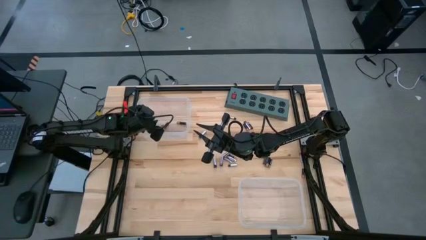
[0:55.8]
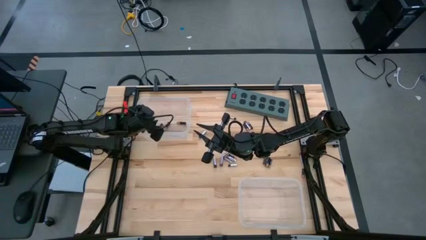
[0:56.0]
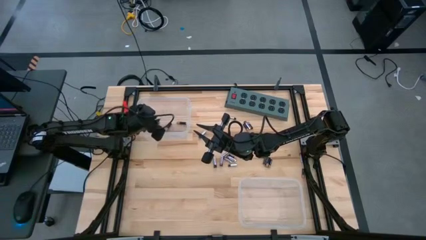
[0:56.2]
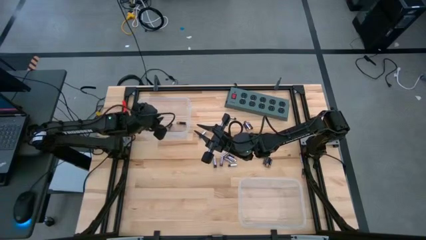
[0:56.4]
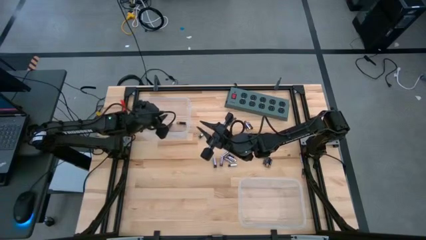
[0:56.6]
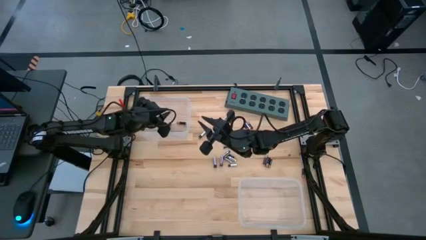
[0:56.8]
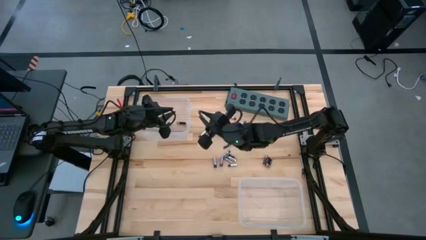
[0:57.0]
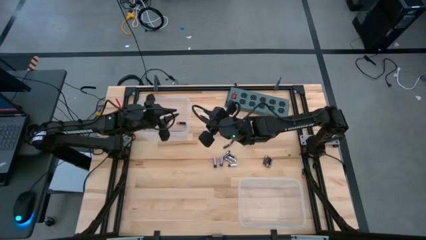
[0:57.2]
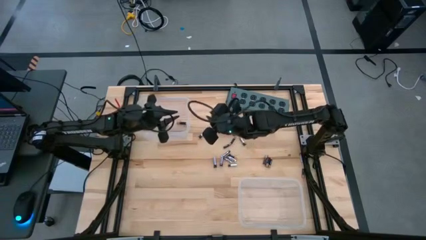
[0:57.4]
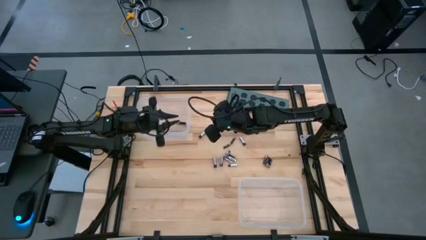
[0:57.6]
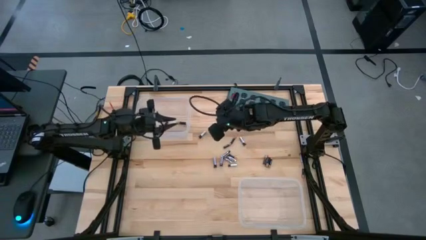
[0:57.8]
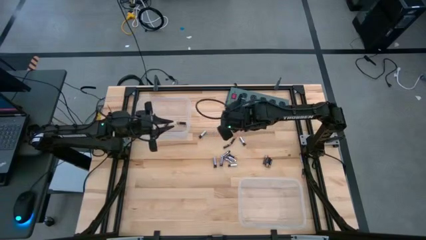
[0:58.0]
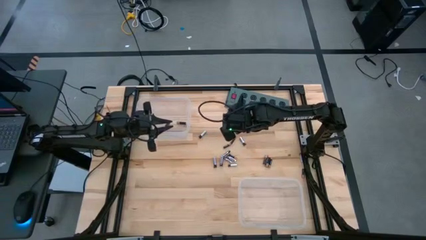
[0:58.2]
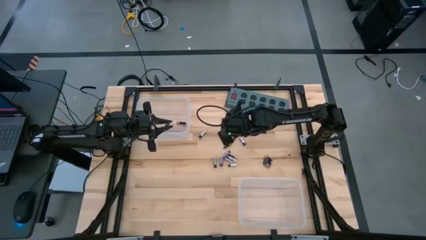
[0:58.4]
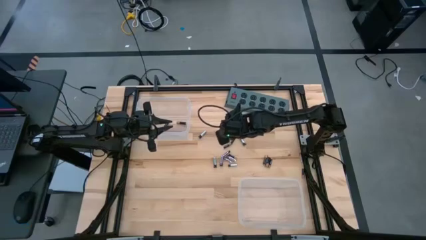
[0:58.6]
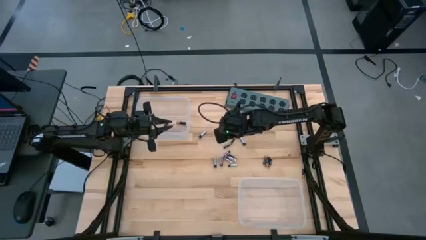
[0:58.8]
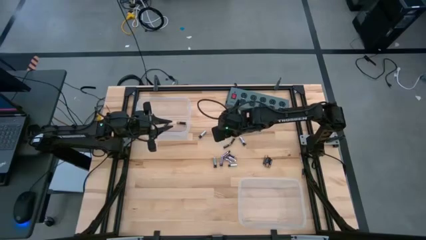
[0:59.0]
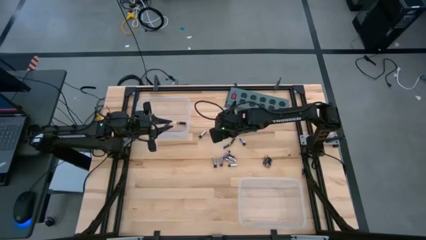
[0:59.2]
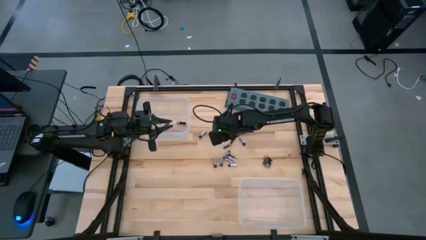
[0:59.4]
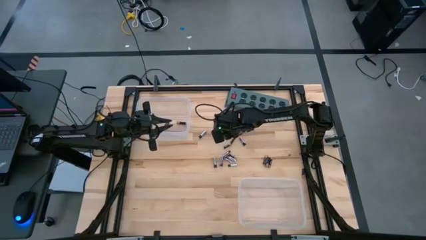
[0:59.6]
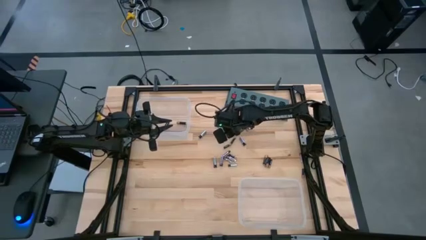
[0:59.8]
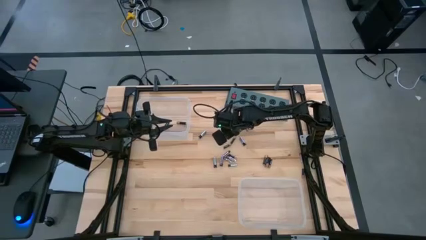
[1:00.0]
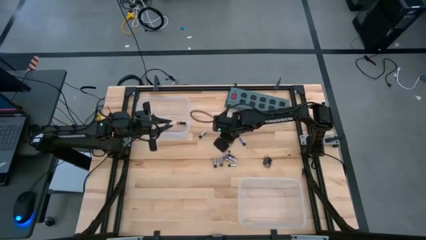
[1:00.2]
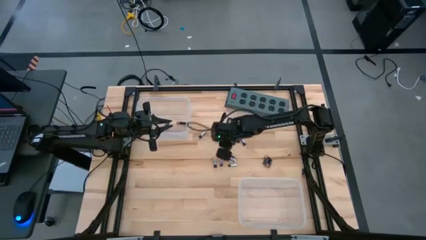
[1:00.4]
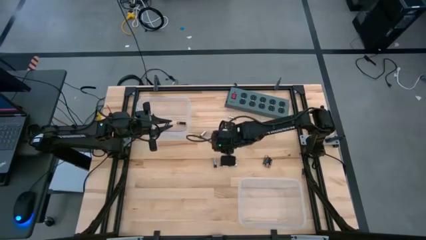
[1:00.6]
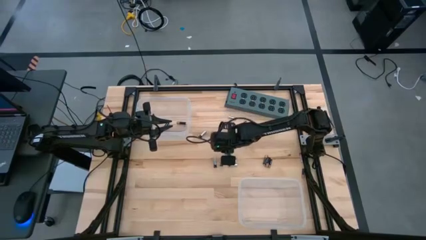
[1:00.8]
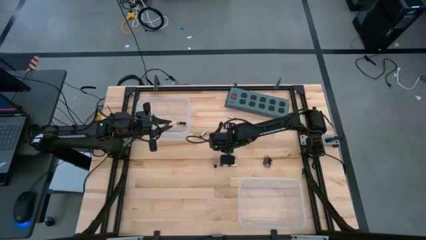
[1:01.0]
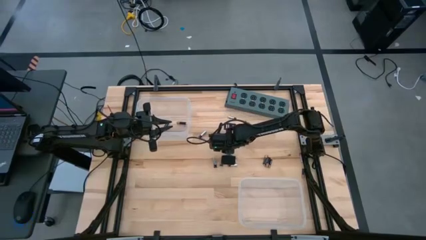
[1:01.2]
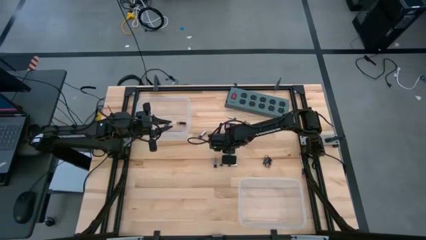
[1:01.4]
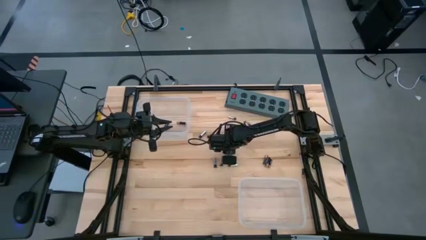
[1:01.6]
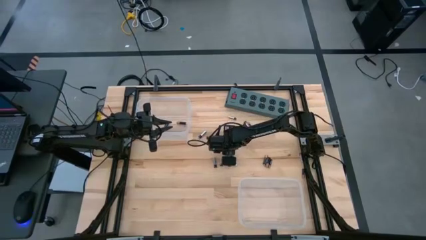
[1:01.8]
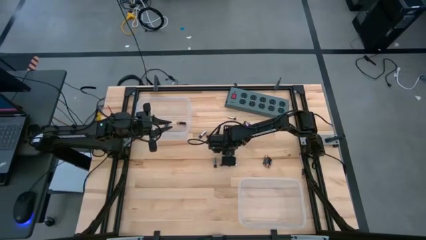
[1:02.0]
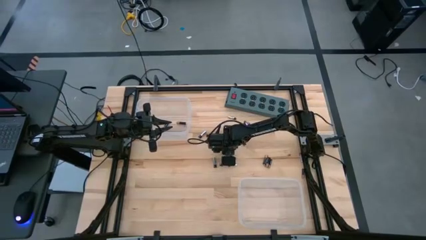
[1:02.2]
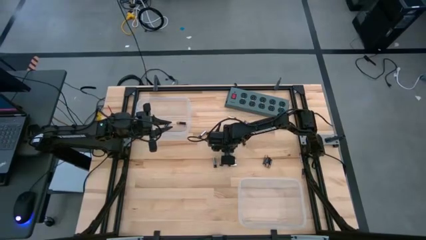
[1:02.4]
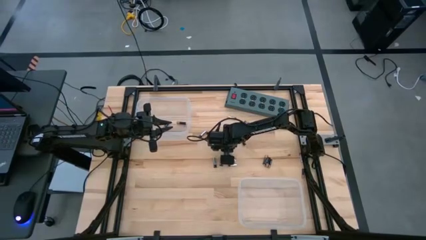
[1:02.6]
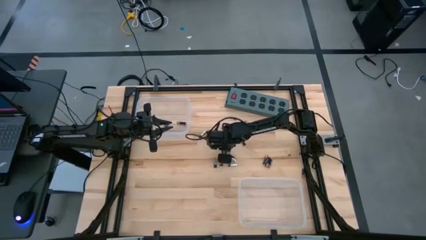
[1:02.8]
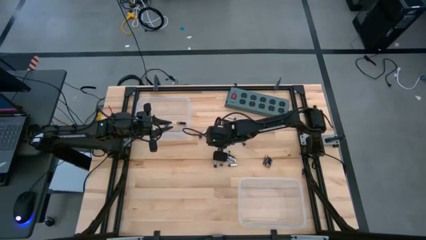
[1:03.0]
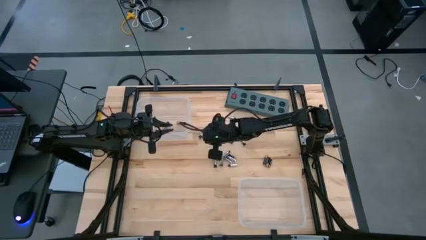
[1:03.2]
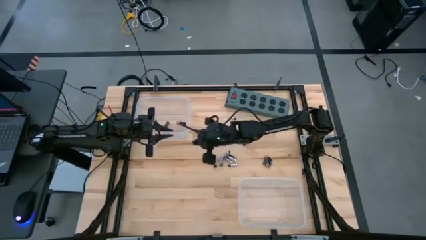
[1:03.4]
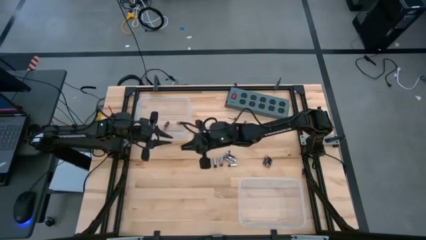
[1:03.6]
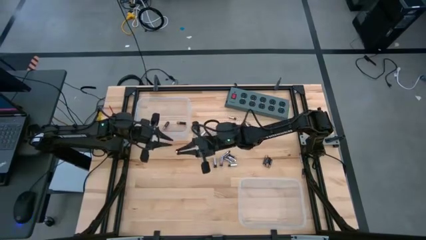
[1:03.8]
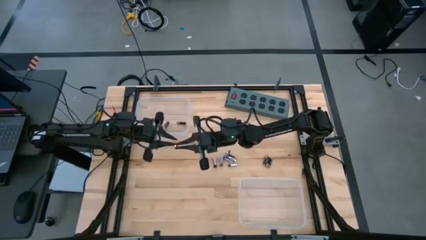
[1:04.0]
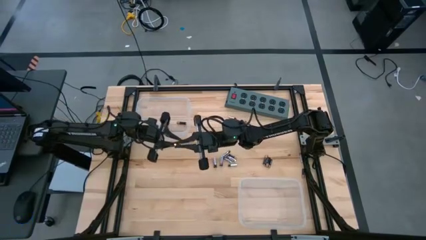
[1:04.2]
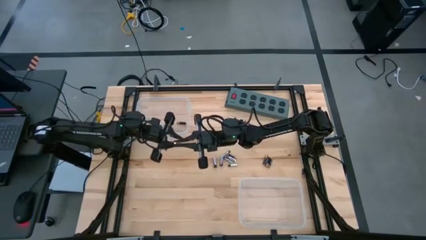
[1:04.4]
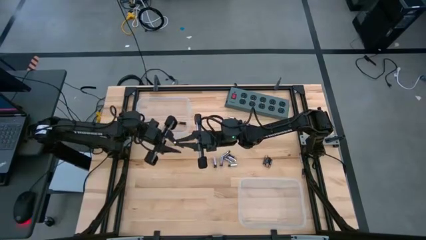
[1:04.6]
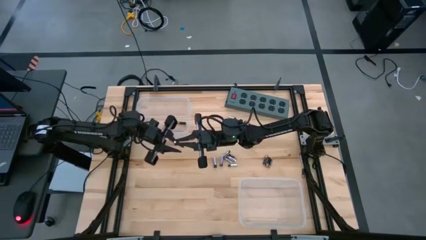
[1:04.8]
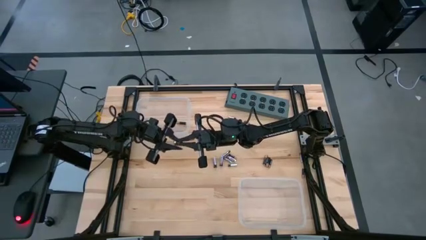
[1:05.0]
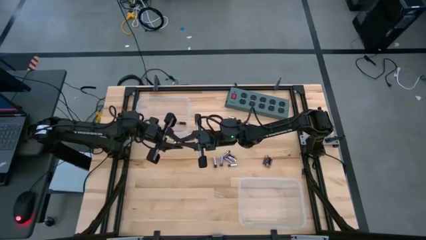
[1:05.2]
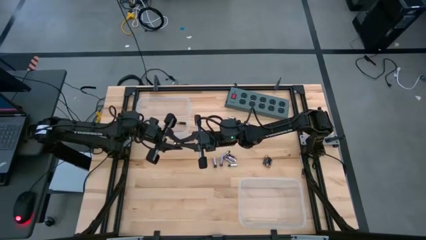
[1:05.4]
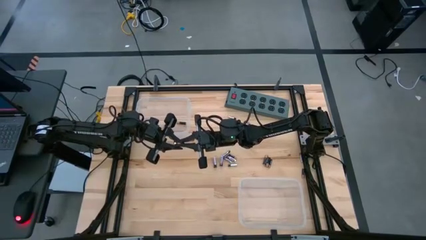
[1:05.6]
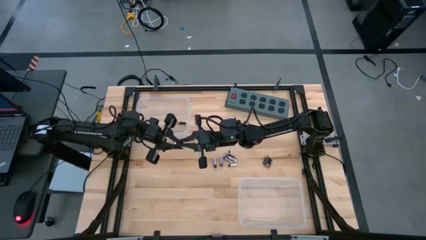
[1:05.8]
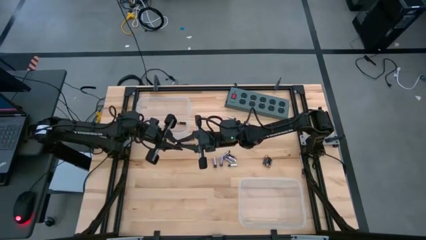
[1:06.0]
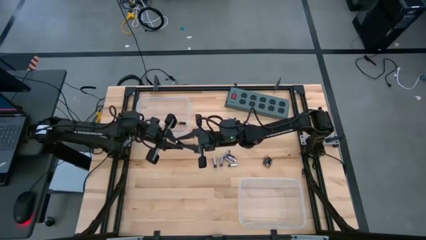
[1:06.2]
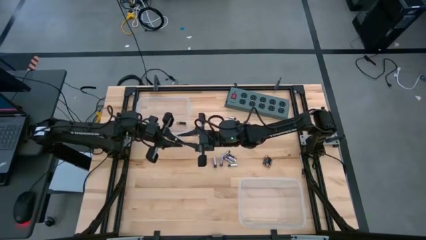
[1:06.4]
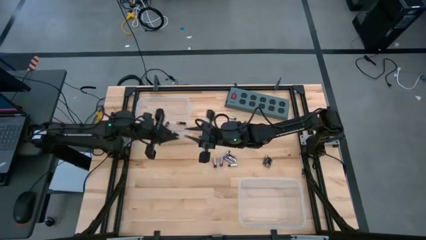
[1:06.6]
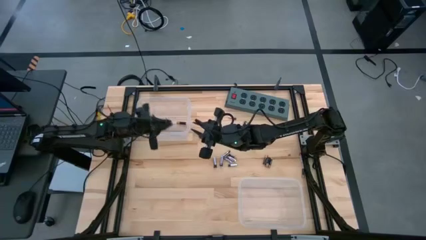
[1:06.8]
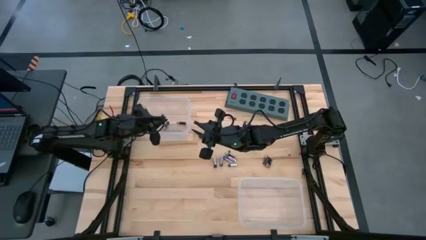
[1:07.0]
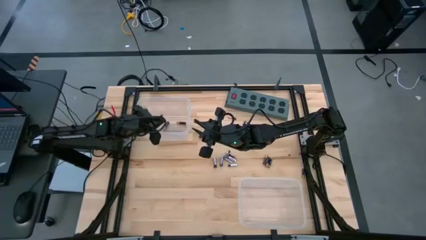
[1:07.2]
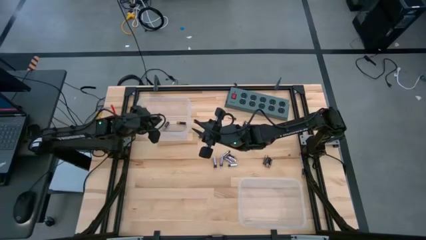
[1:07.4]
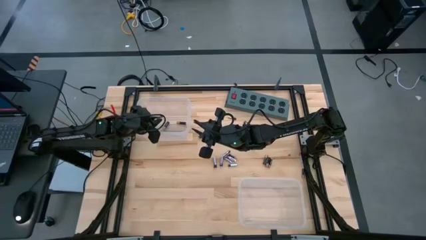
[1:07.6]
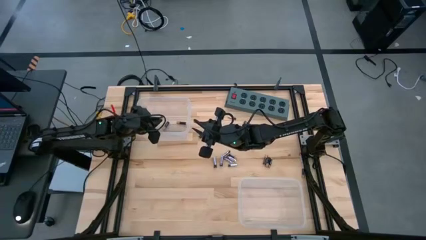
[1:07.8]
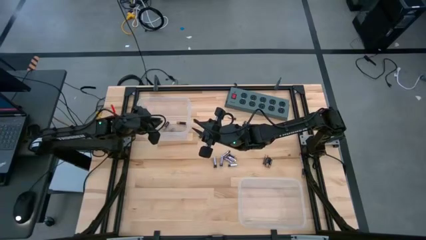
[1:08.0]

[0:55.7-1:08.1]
Task: Sort batteries
Put the black battery into the top transparent bin
